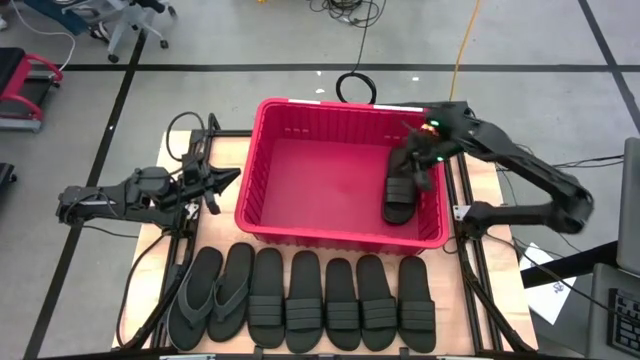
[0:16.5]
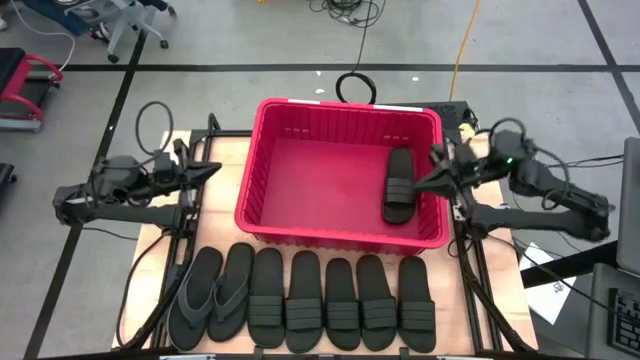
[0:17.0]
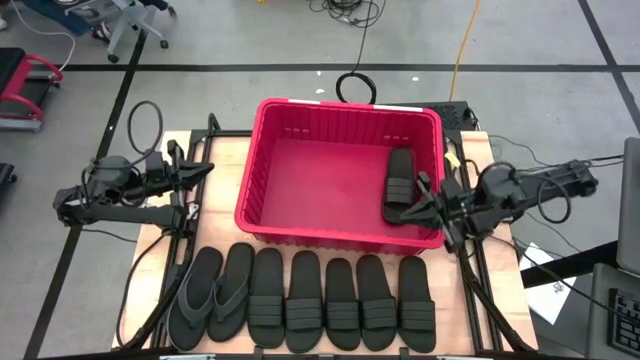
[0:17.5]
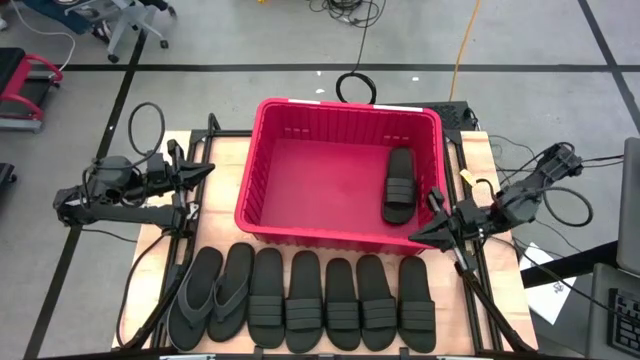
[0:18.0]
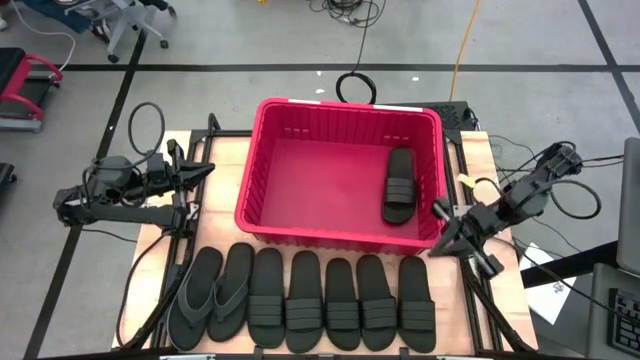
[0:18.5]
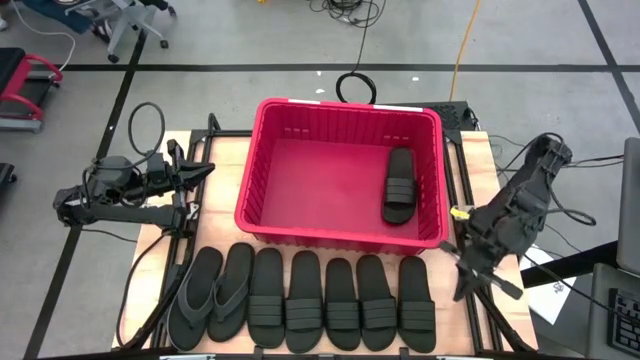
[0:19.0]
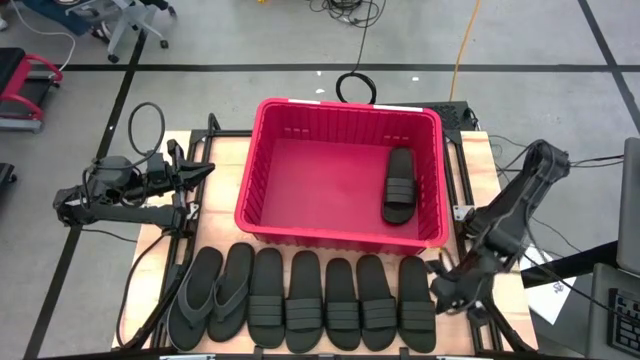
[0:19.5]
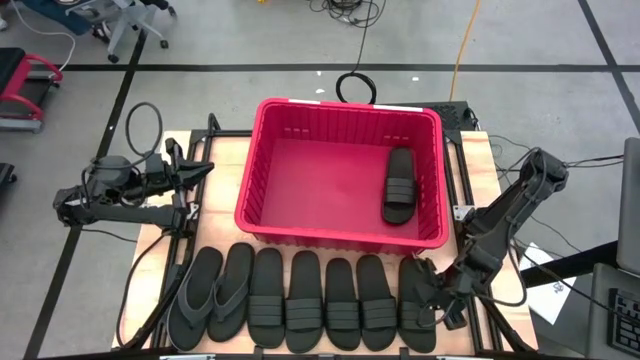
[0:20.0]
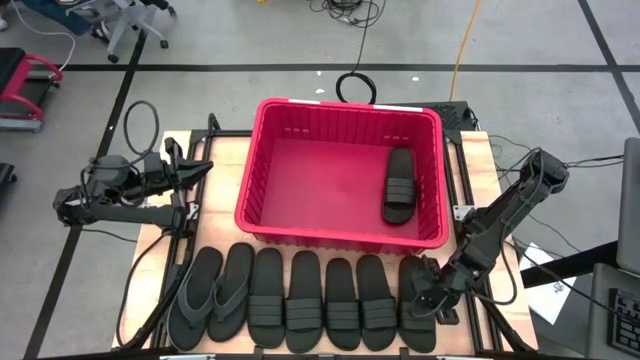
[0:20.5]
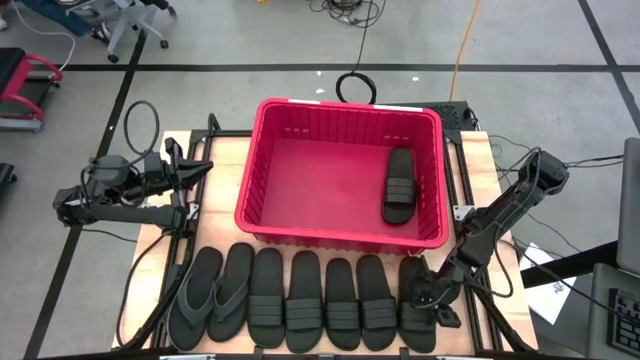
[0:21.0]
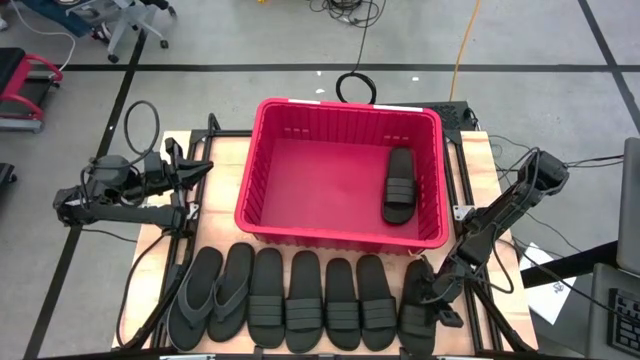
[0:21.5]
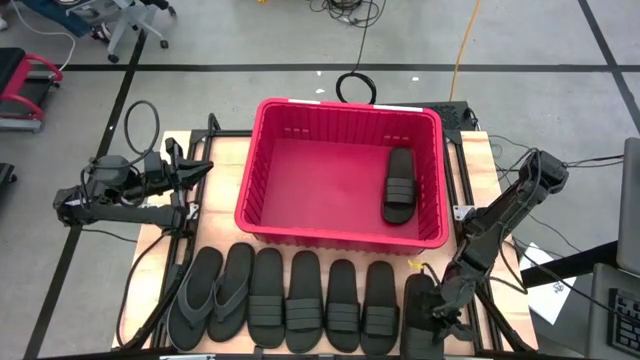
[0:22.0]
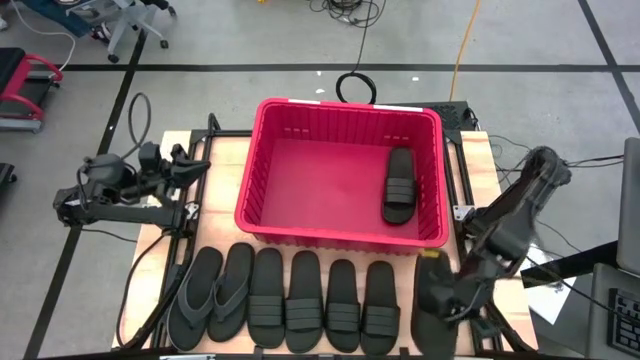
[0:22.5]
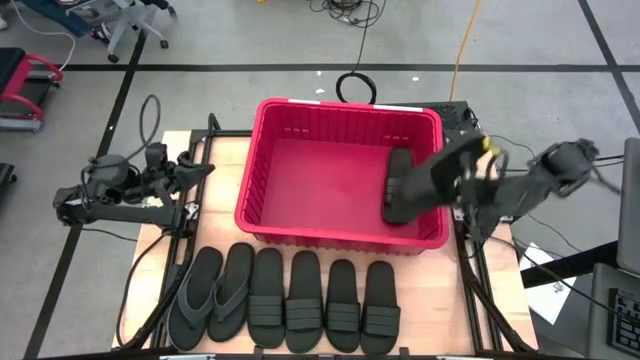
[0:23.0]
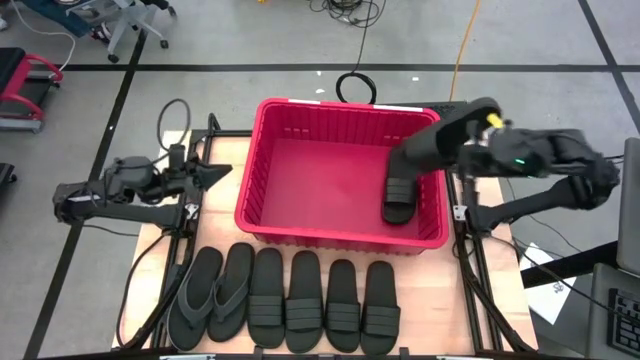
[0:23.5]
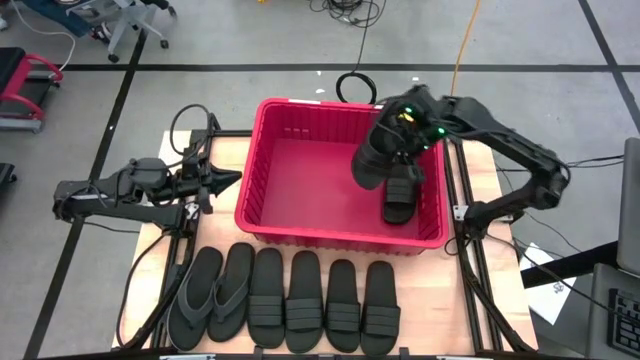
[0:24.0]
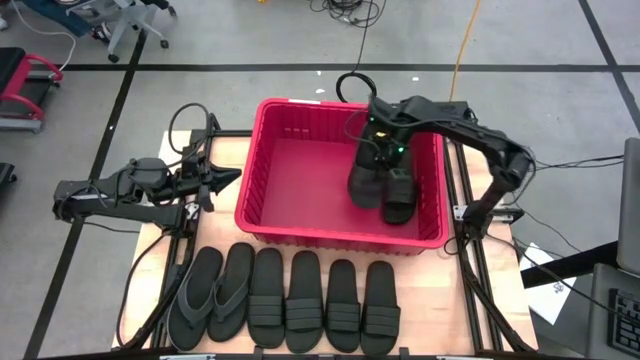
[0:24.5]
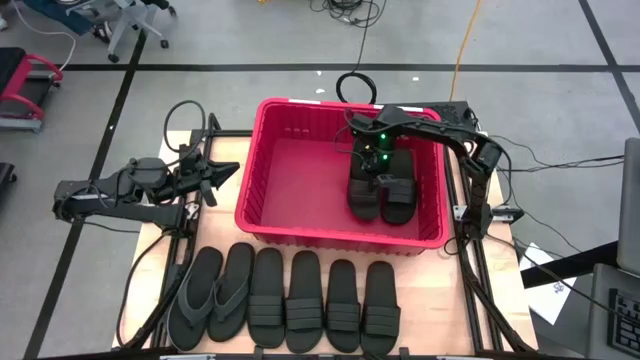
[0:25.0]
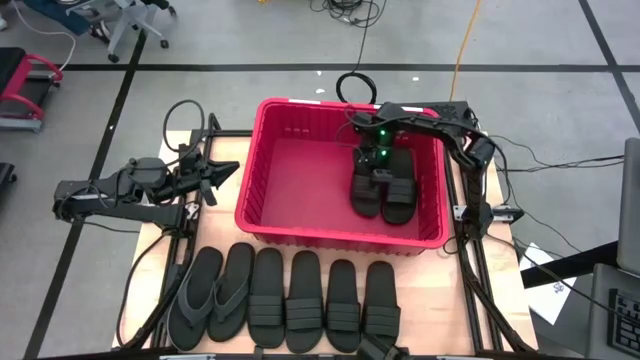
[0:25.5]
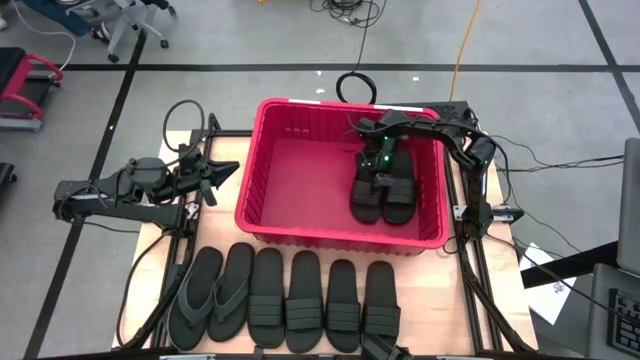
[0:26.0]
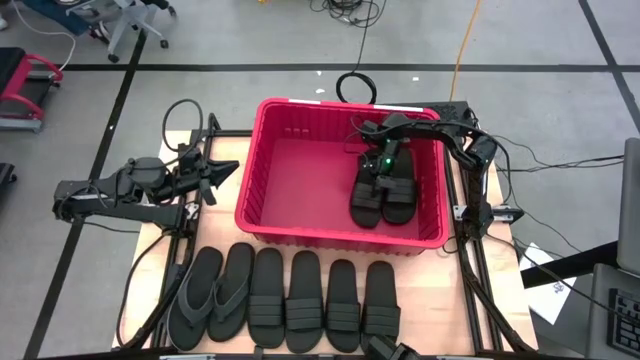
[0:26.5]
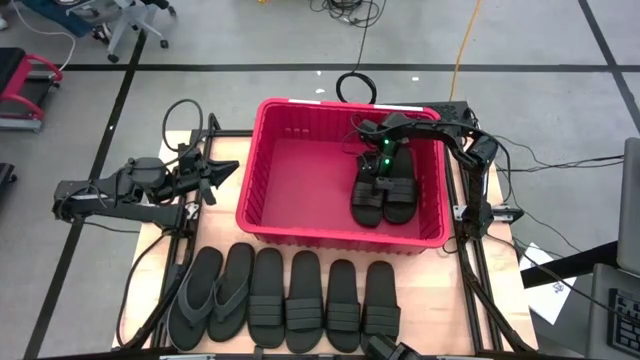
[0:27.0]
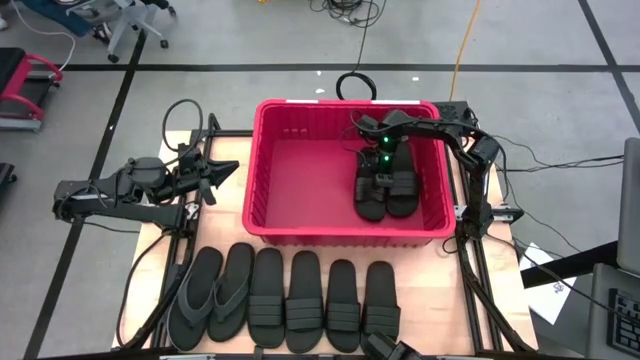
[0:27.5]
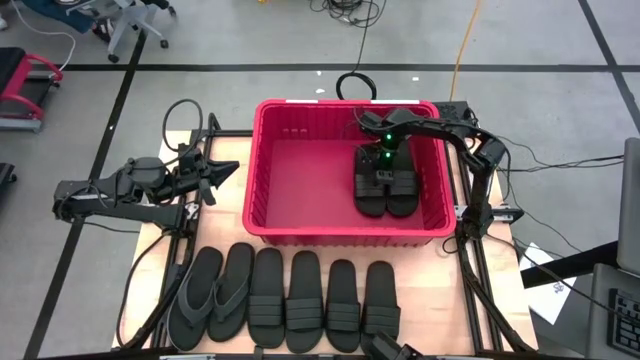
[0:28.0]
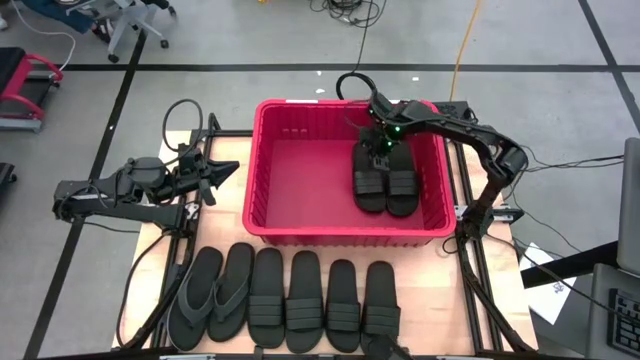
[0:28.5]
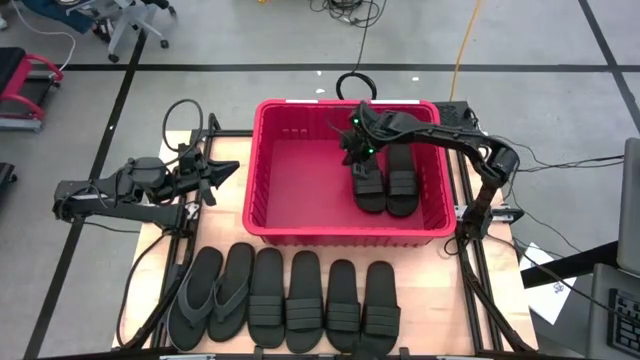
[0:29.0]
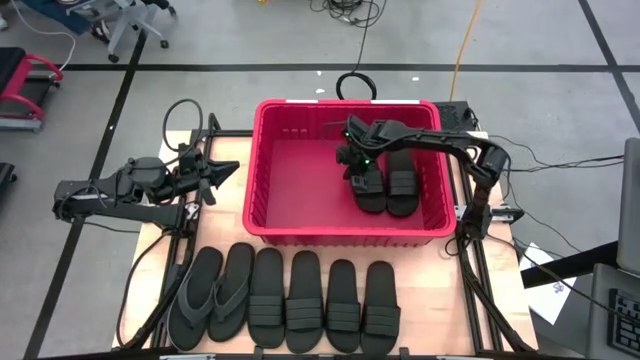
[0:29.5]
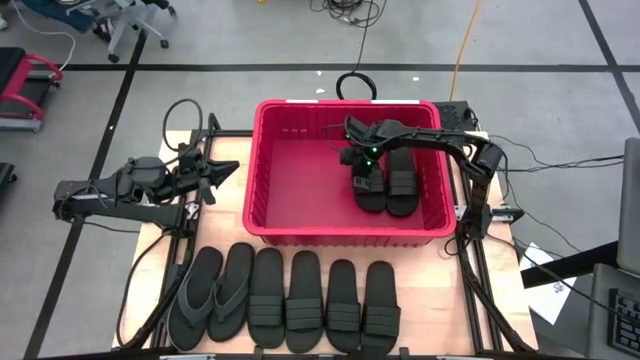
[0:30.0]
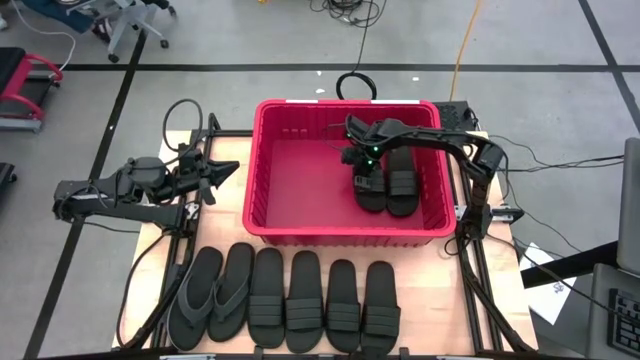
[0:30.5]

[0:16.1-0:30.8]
Task: Pick and place slides into bin
Put the black slide into the red container

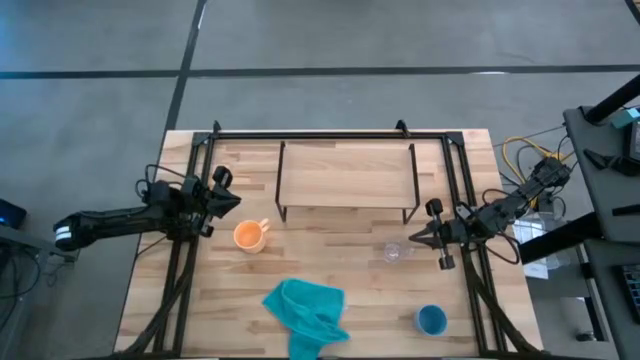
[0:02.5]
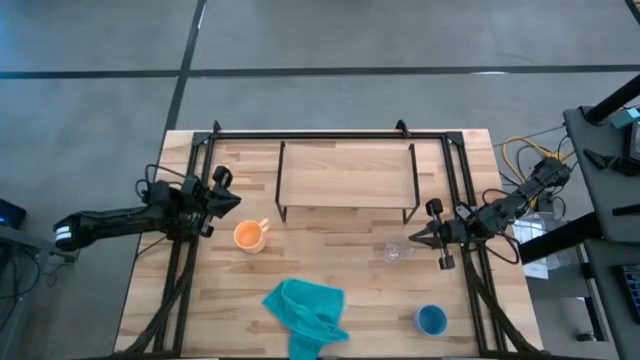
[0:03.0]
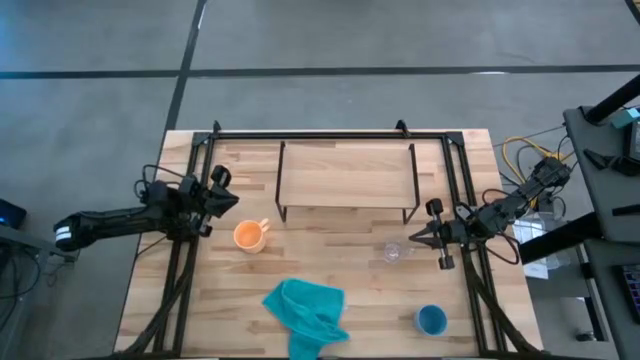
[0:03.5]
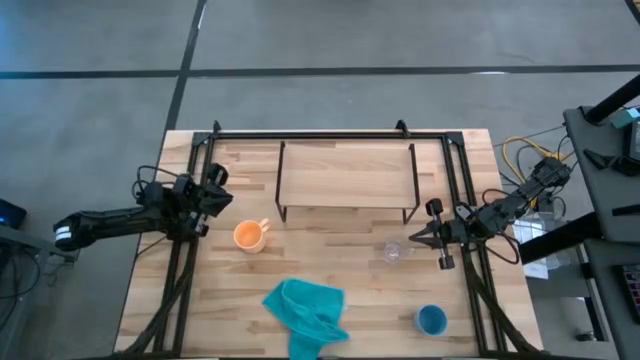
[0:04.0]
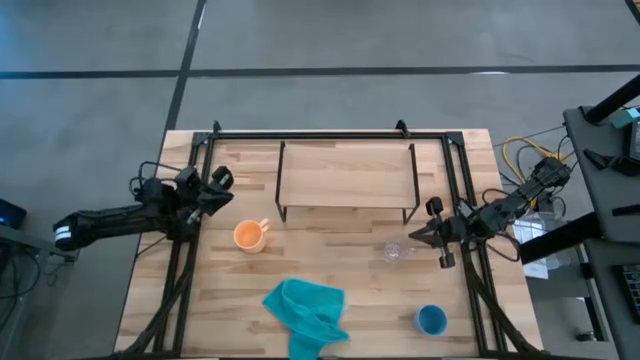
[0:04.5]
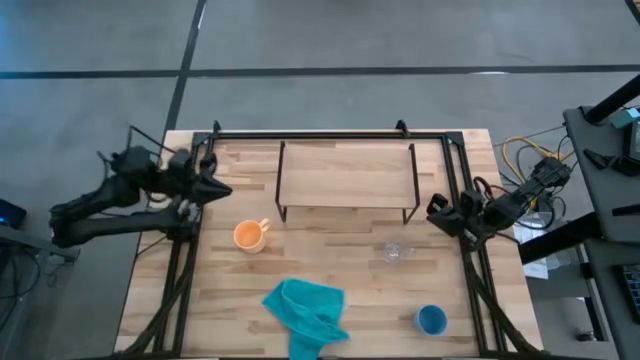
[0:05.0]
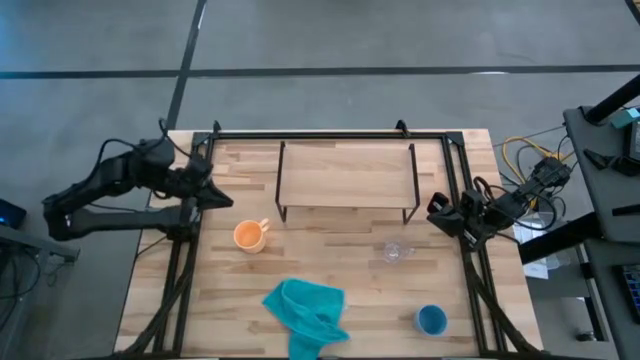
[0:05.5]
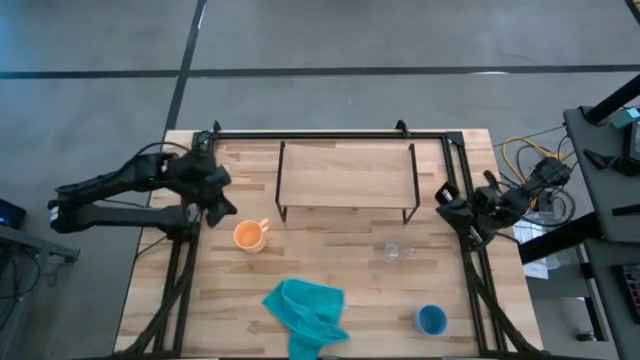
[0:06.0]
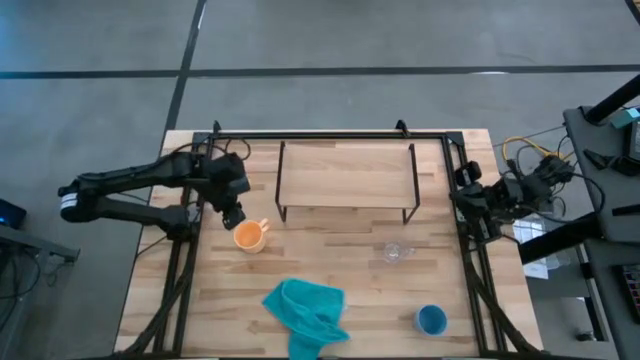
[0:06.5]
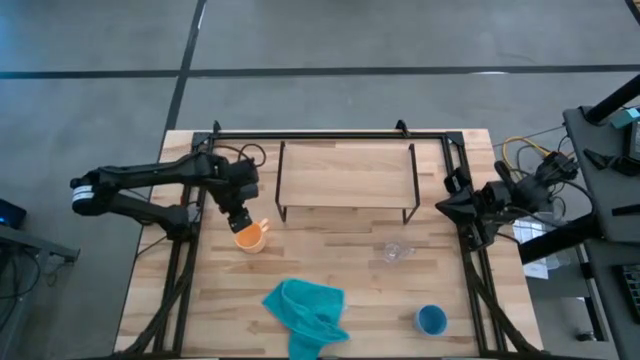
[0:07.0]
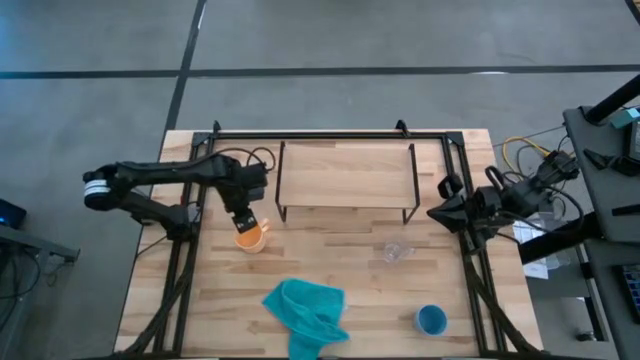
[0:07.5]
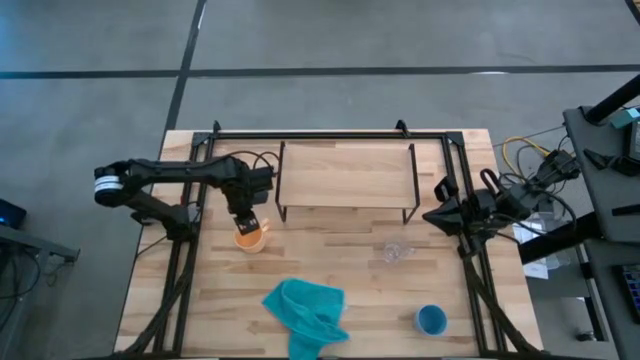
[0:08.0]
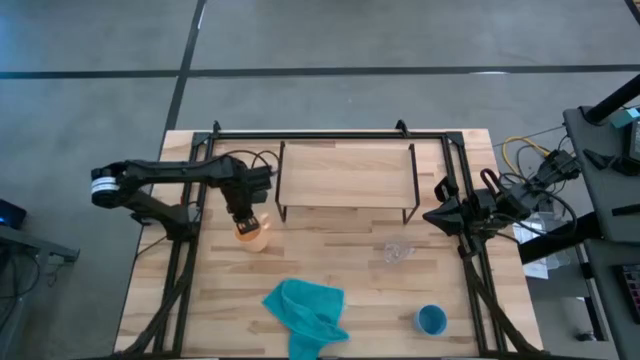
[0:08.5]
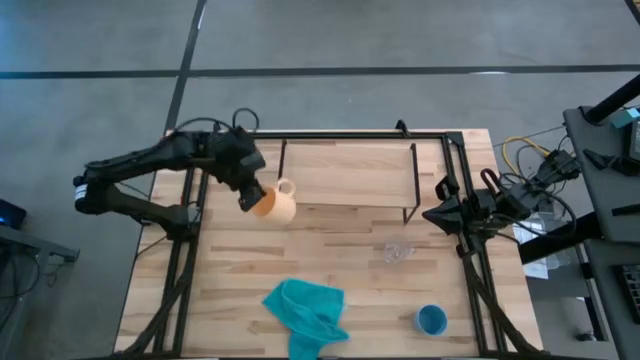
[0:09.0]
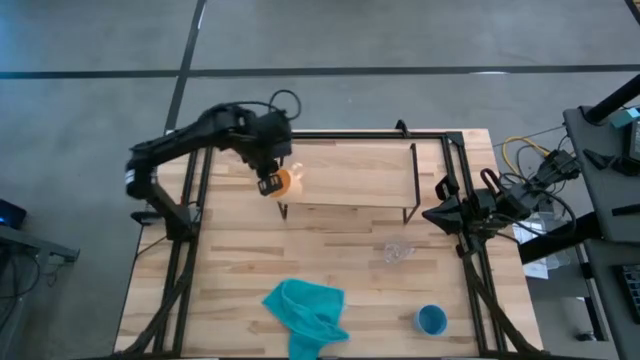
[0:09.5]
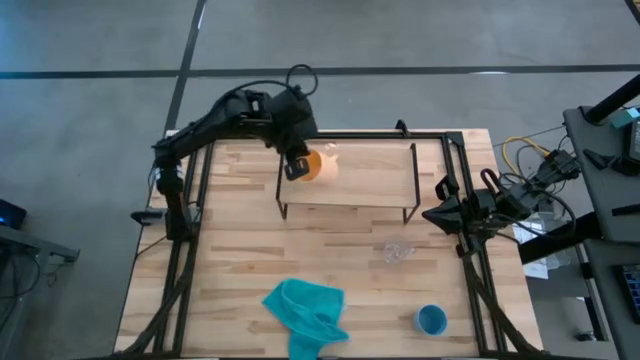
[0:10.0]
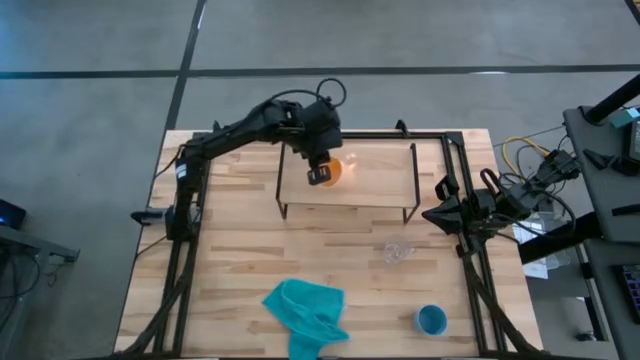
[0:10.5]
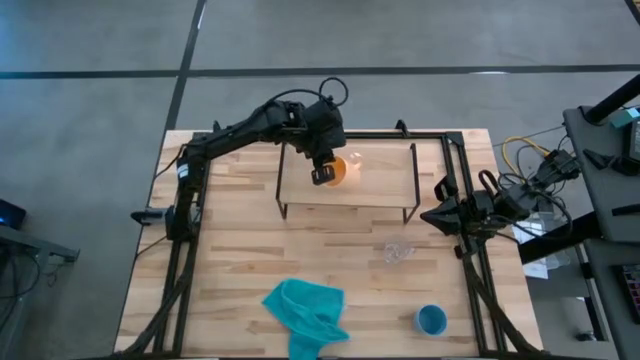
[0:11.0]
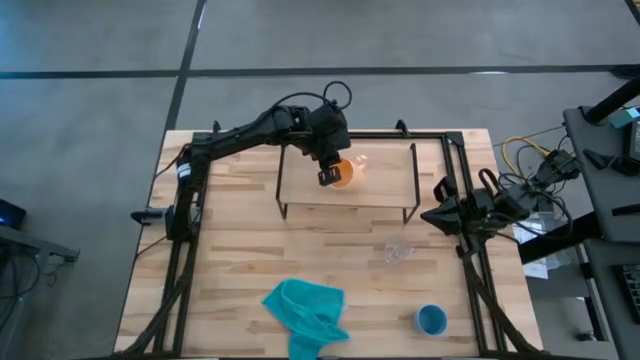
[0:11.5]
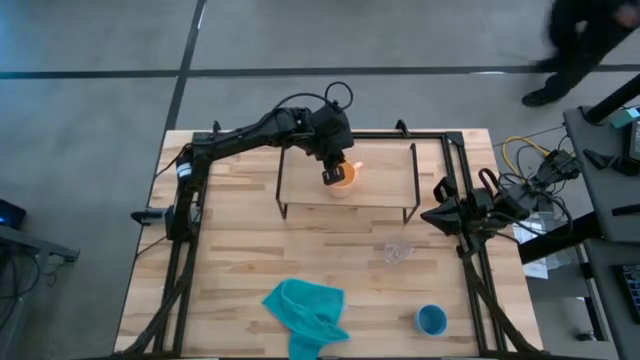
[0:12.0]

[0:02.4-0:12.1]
Task: Stack small to large cups/mugs on shelf
Put the yellow mug on the shelf
